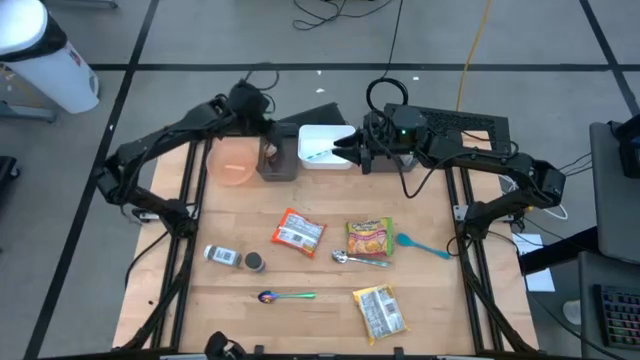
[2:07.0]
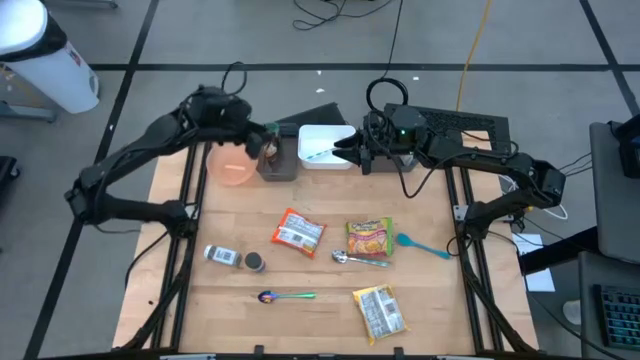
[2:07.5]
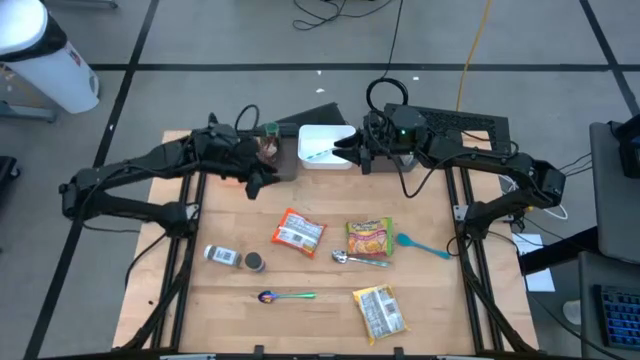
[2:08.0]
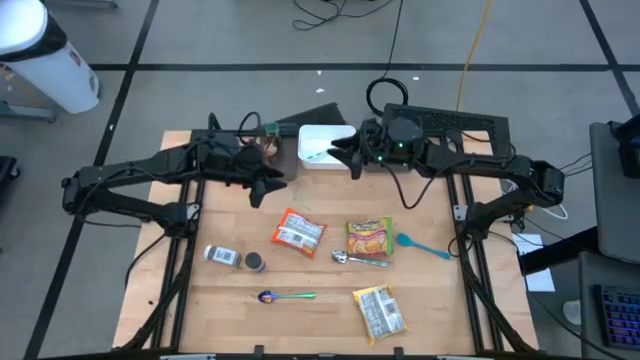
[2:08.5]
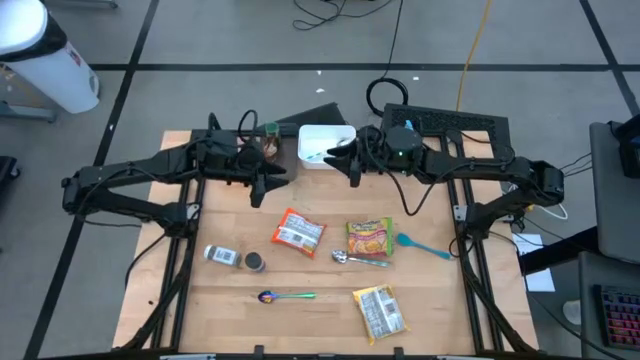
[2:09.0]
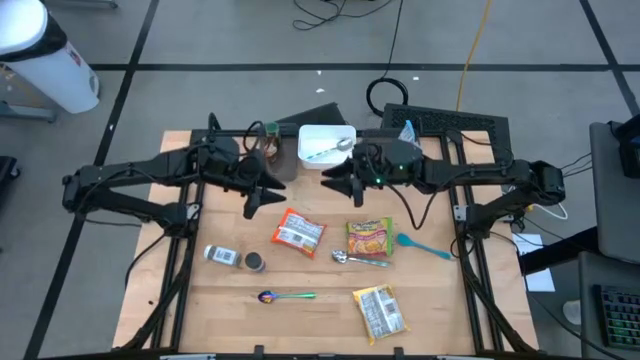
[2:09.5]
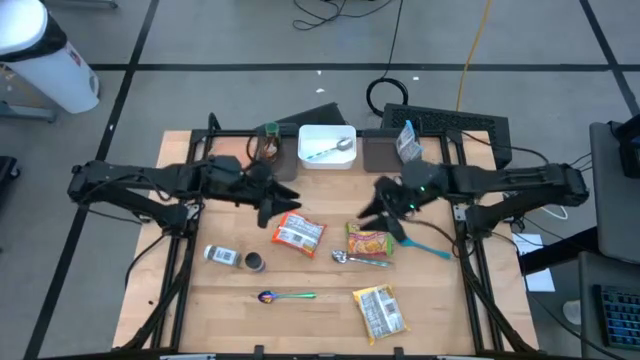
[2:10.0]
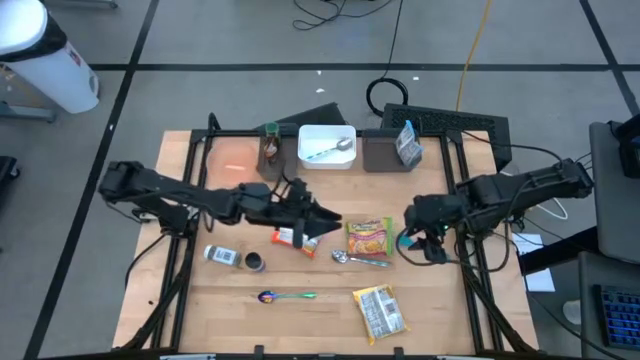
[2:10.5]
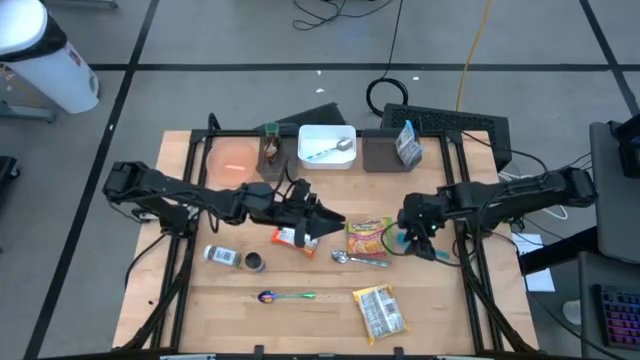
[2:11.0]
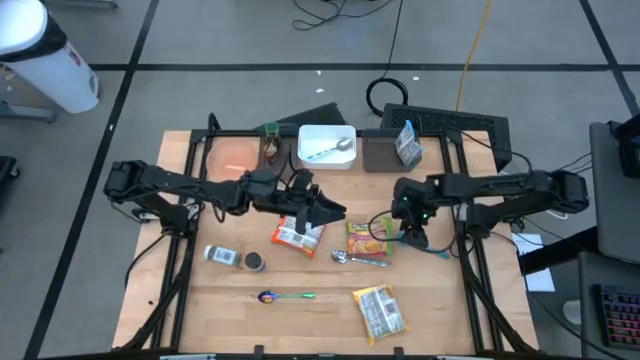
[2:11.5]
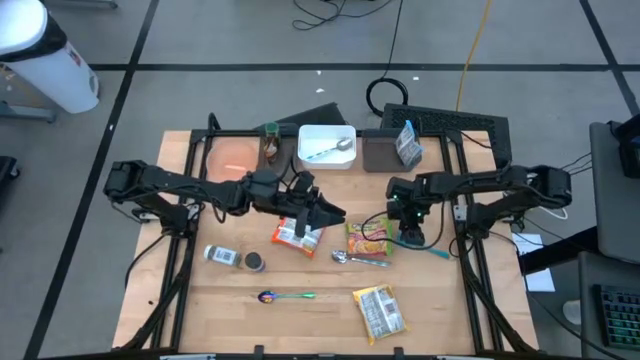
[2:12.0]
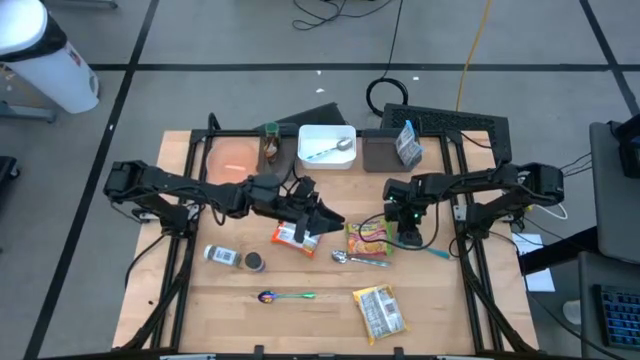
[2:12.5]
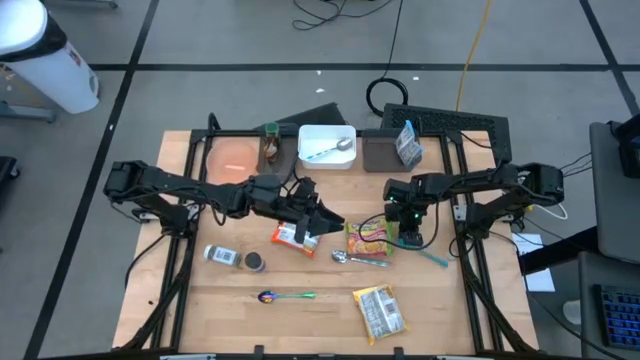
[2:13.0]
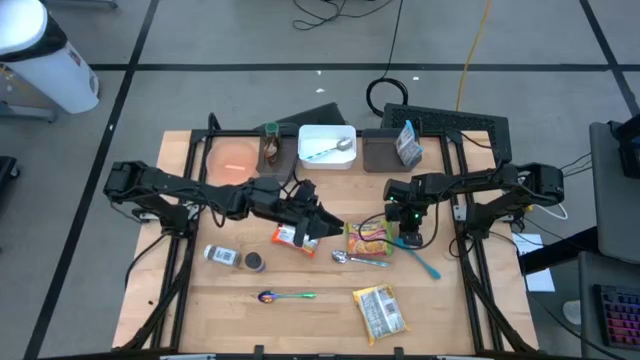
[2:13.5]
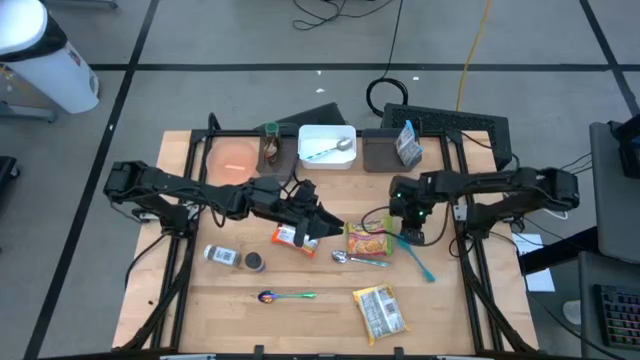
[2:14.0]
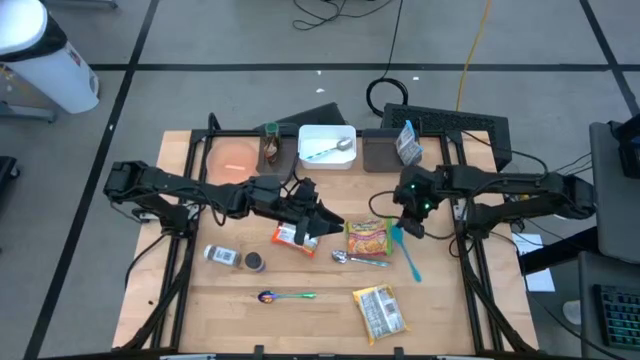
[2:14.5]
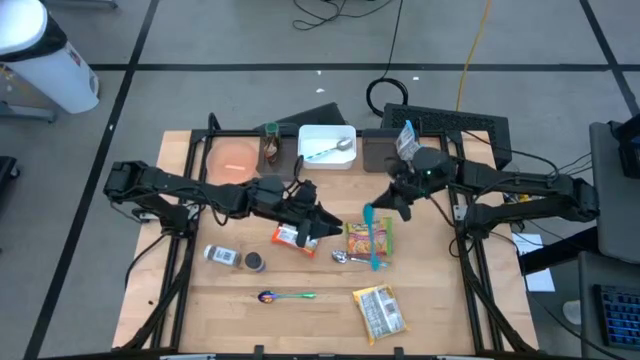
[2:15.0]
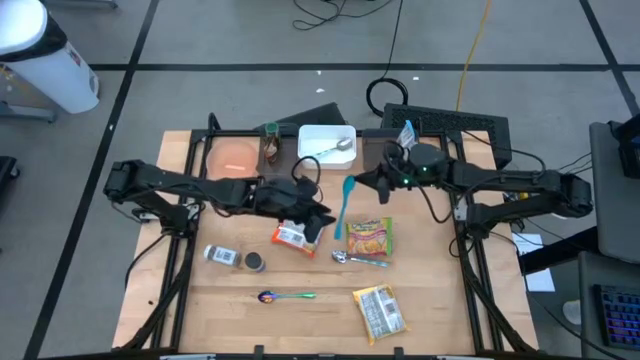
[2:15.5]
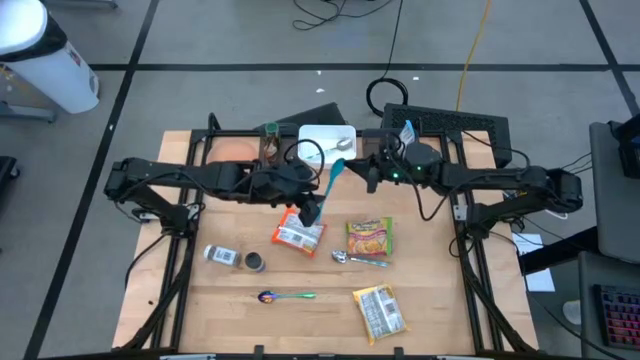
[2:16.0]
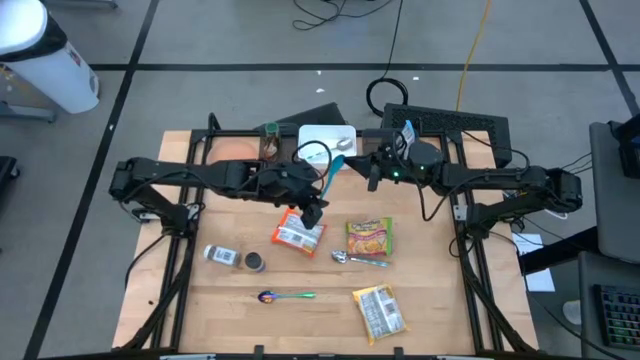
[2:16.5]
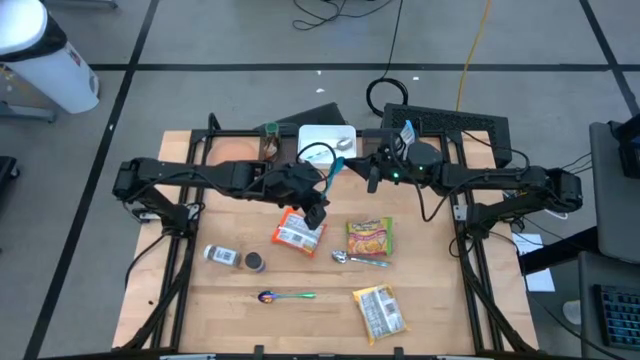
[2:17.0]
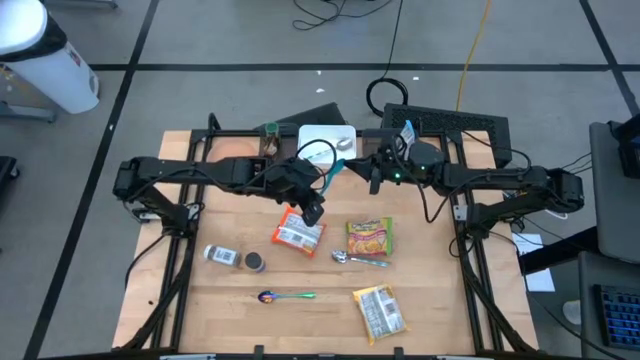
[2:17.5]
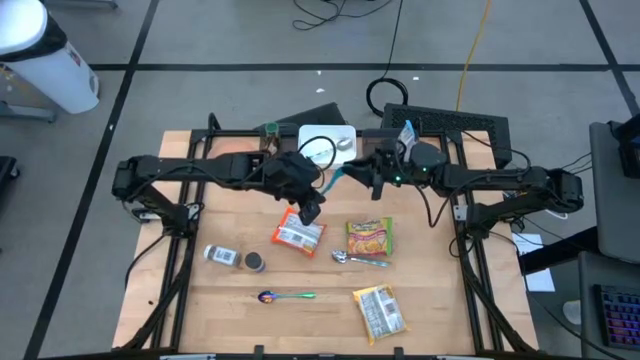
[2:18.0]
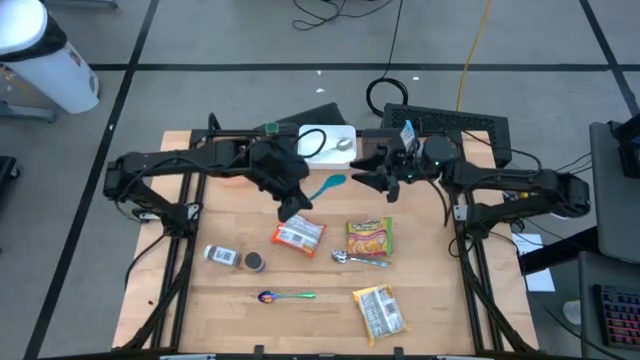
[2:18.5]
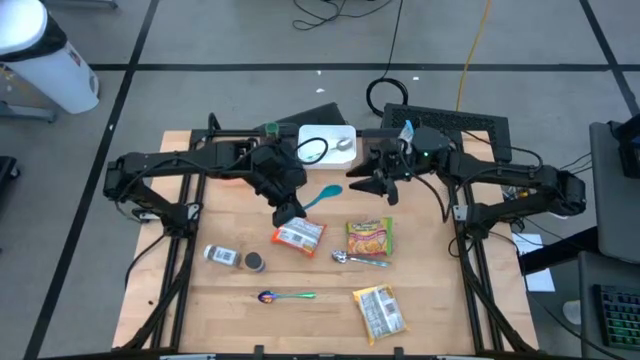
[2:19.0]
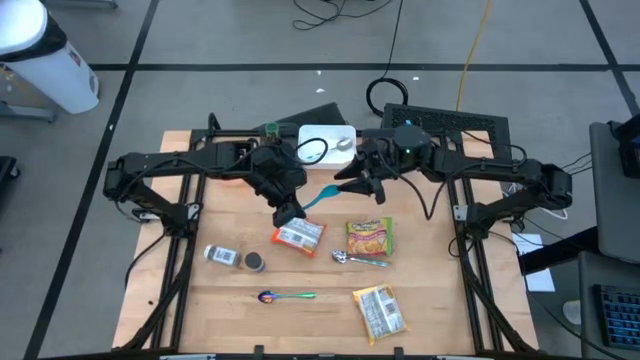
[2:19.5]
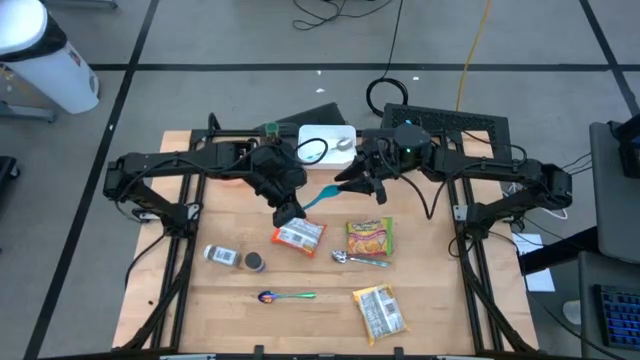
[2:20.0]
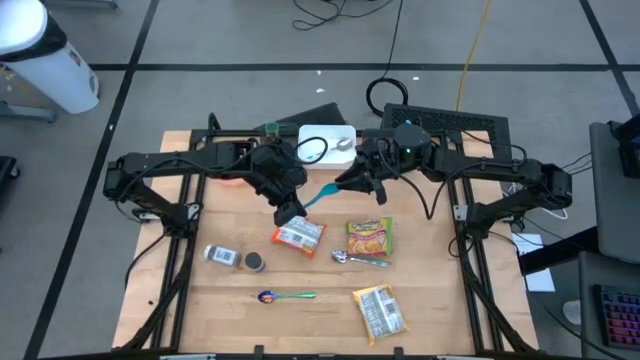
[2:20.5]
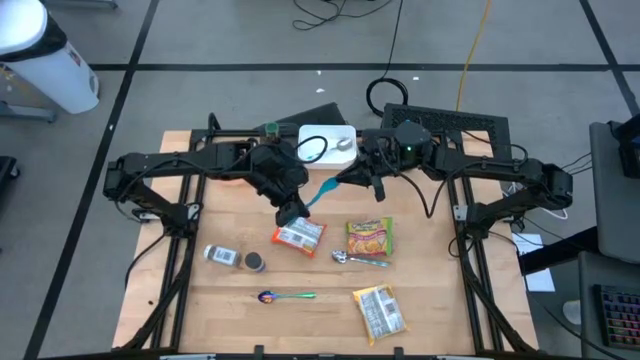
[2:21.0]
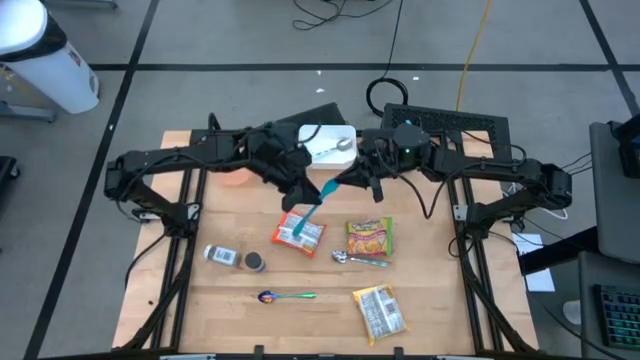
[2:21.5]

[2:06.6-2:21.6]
Task: Pick & Place Food Item
Put the blue baby spoon into the white bin

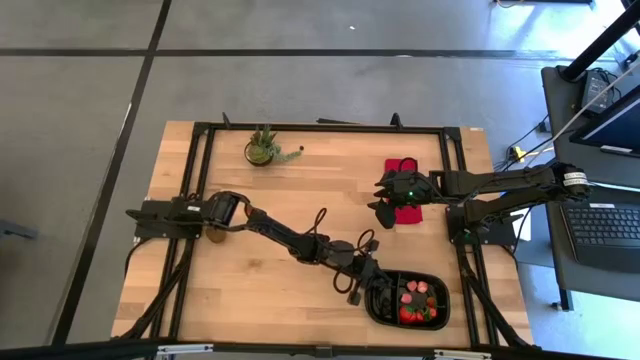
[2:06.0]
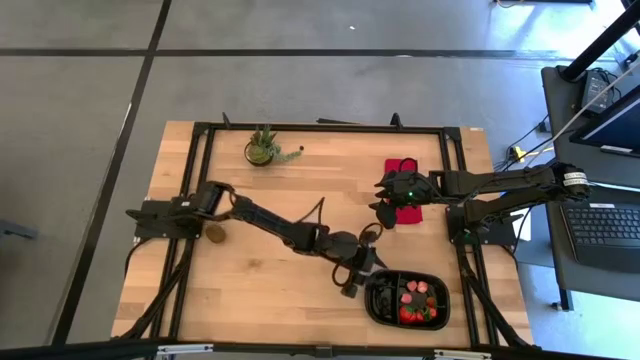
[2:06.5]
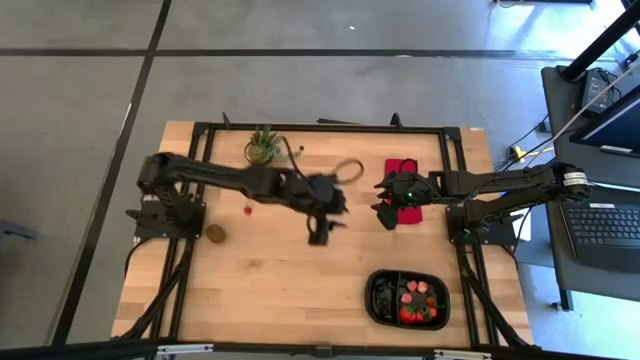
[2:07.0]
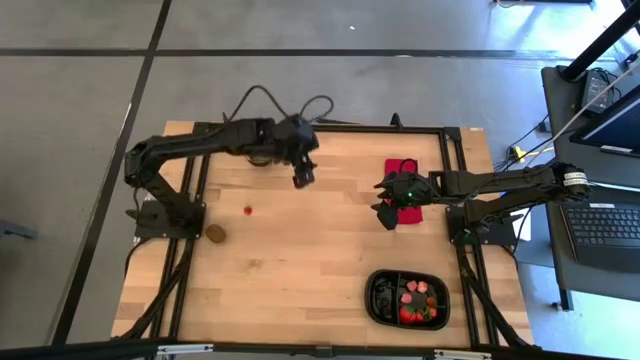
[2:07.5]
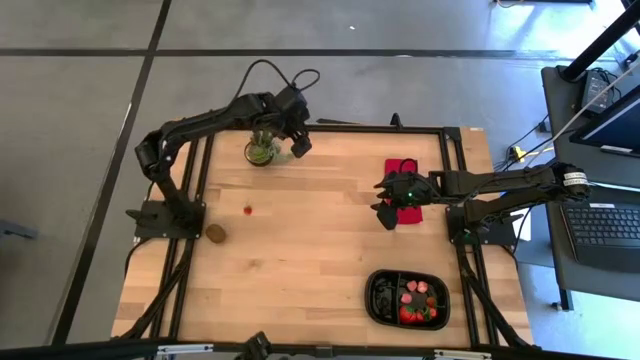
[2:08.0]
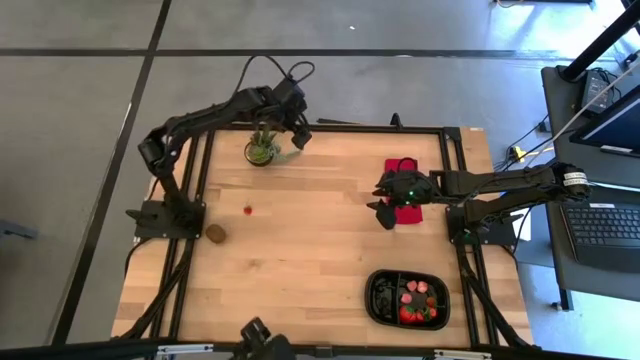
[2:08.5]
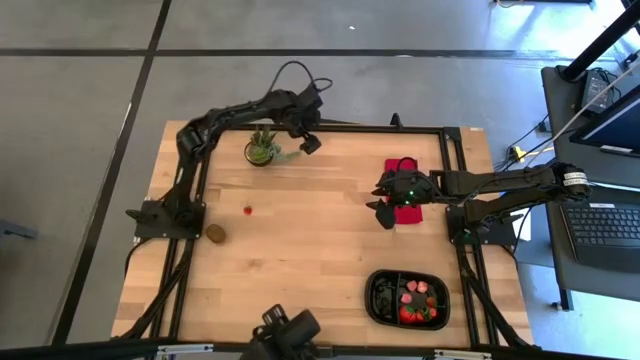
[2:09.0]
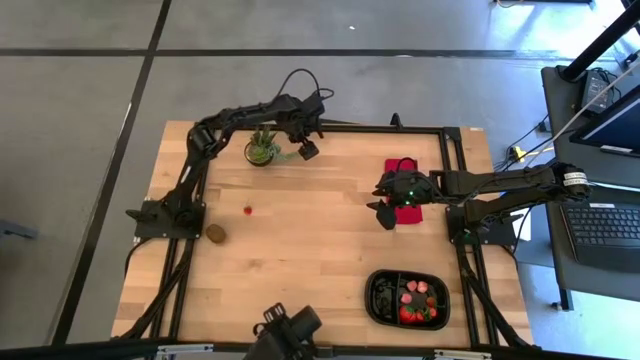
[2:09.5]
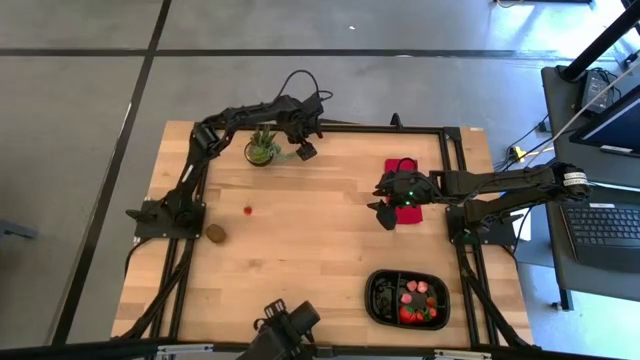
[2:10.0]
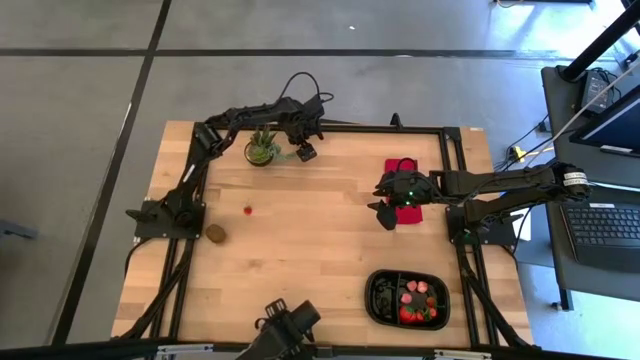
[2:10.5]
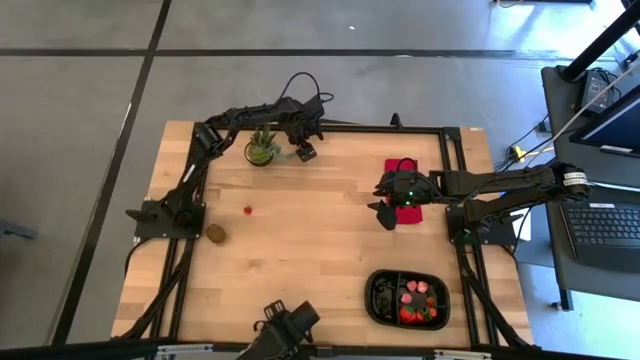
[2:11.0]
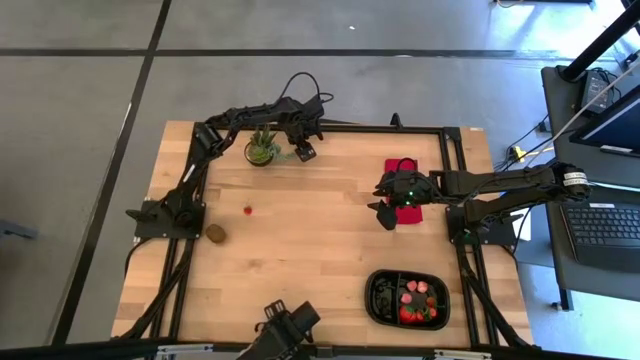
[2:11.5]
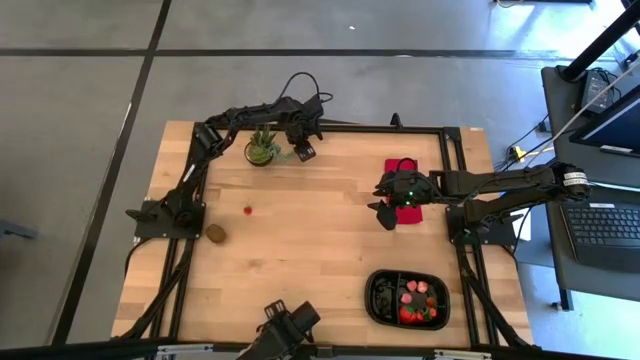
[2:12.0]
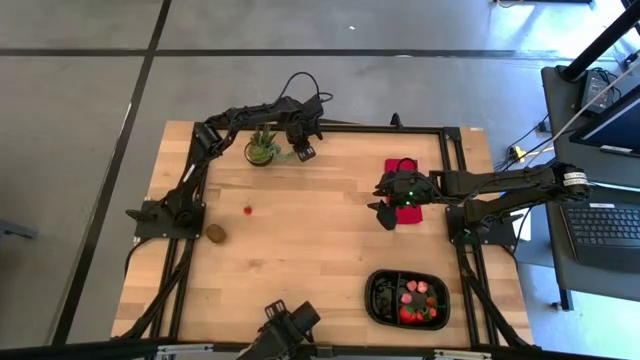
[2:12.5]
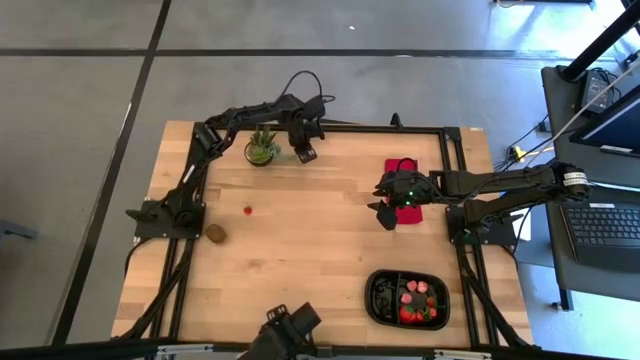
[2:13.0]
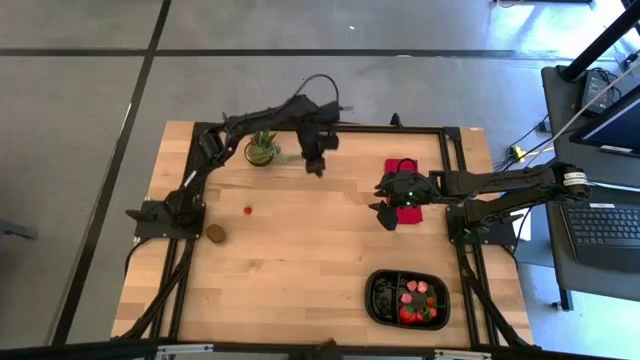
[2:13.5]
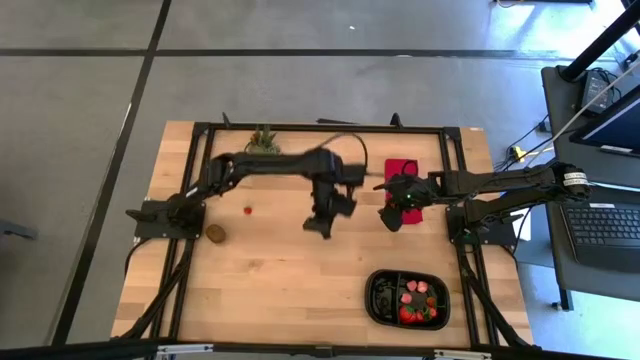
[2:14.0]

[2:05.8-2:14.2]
Task: Pick and placing Produce into tupperware
Put the blueberry into the left of the black bin
